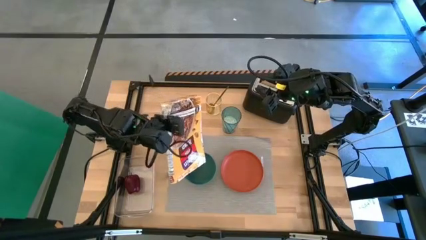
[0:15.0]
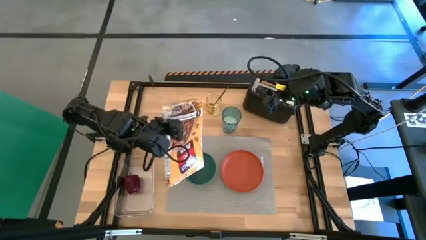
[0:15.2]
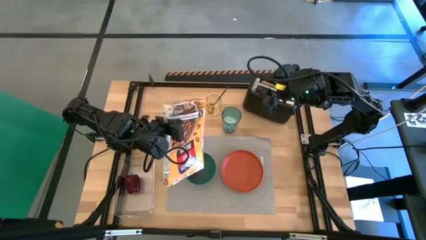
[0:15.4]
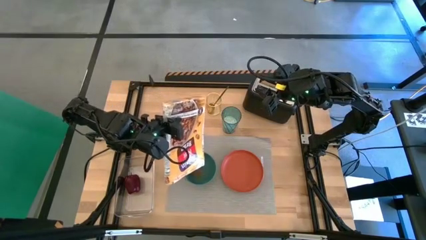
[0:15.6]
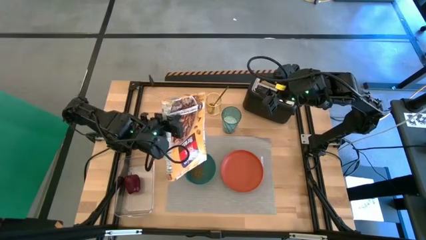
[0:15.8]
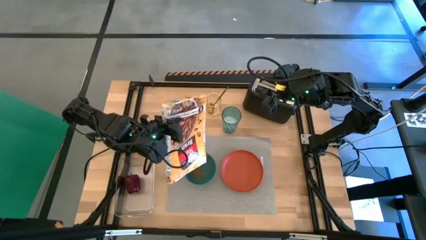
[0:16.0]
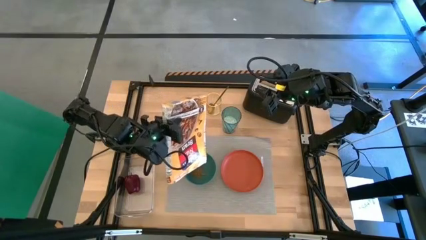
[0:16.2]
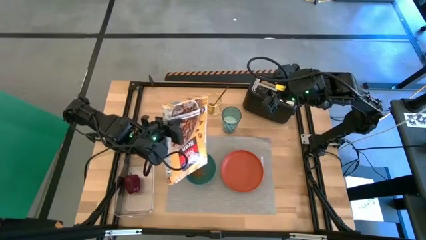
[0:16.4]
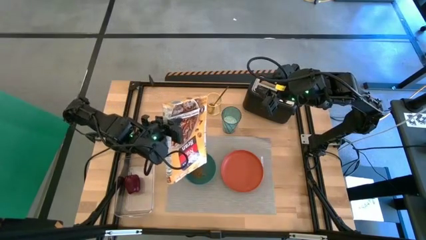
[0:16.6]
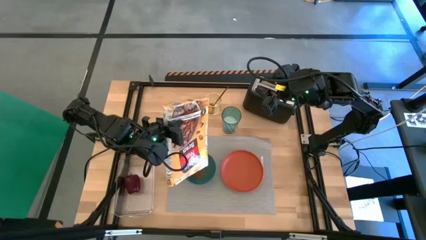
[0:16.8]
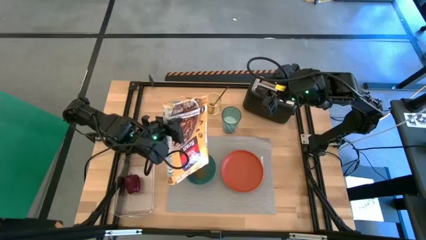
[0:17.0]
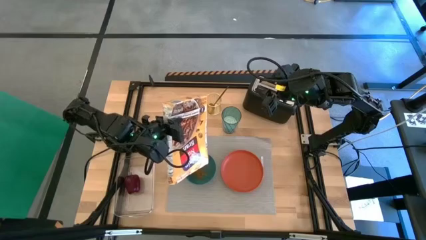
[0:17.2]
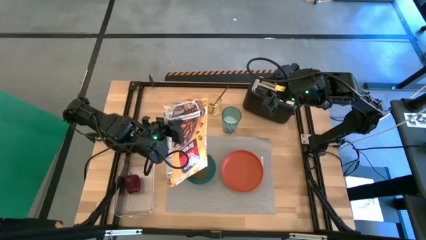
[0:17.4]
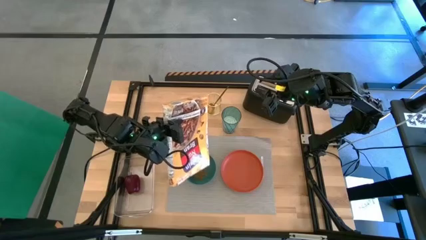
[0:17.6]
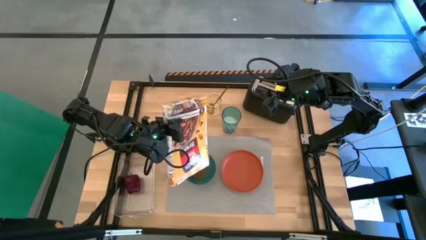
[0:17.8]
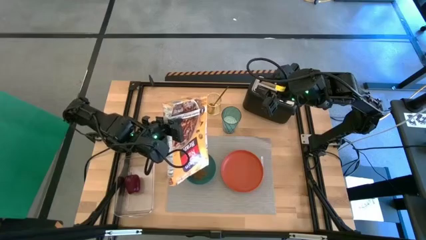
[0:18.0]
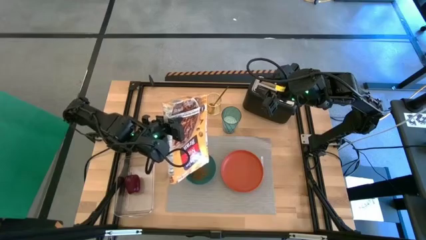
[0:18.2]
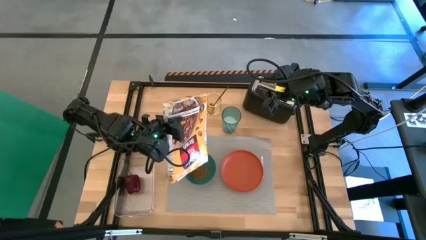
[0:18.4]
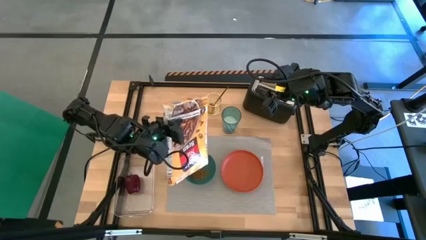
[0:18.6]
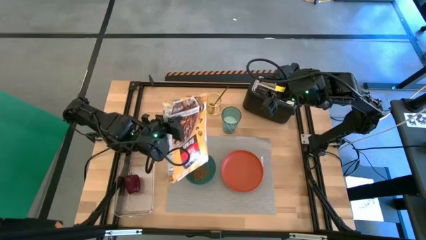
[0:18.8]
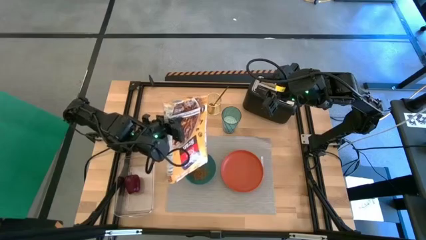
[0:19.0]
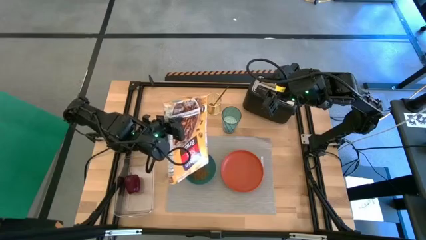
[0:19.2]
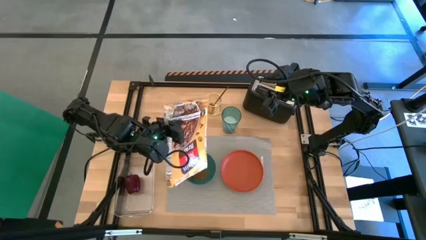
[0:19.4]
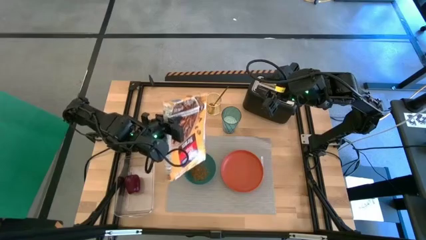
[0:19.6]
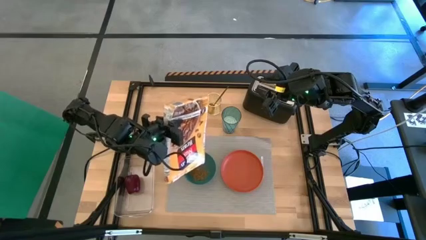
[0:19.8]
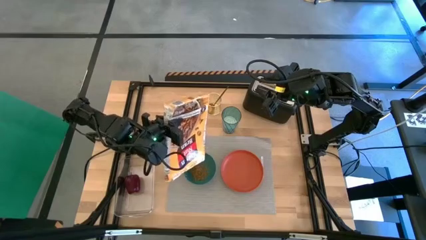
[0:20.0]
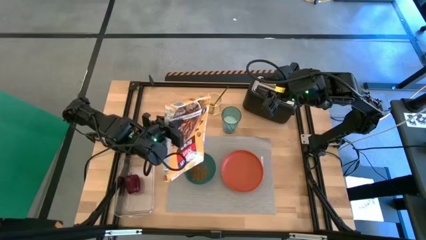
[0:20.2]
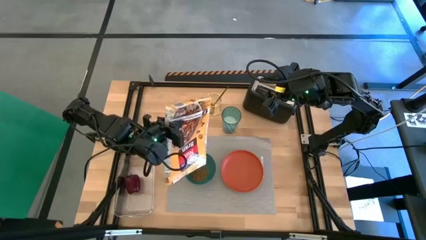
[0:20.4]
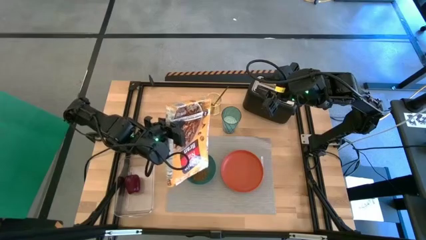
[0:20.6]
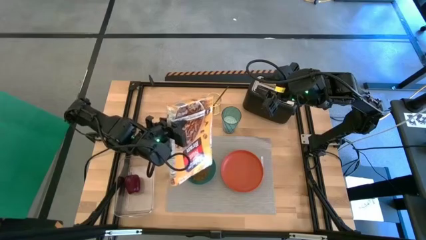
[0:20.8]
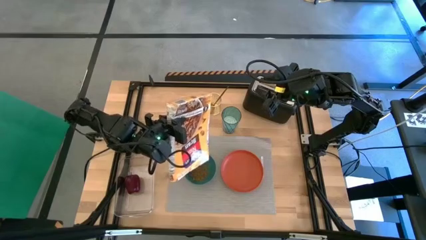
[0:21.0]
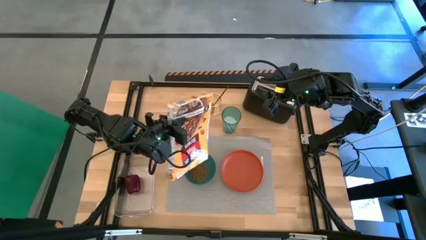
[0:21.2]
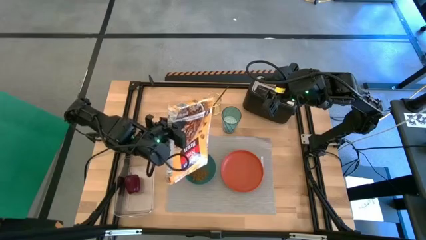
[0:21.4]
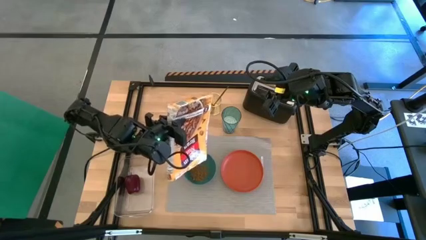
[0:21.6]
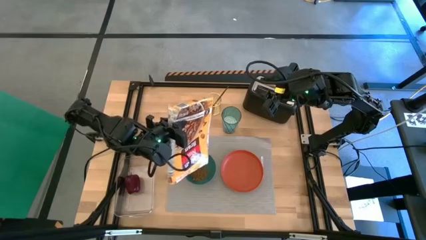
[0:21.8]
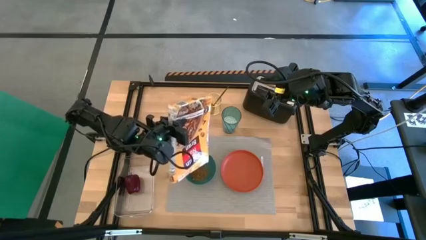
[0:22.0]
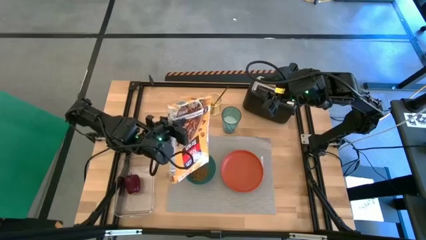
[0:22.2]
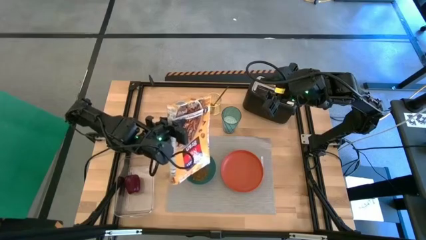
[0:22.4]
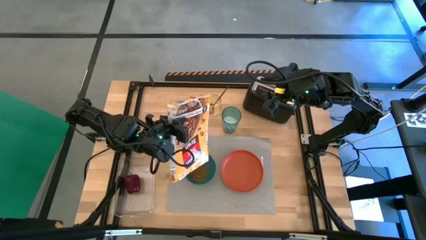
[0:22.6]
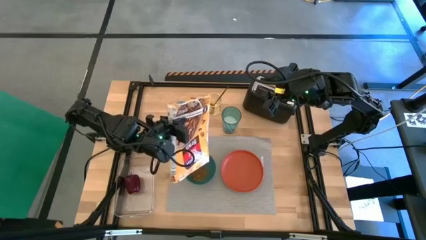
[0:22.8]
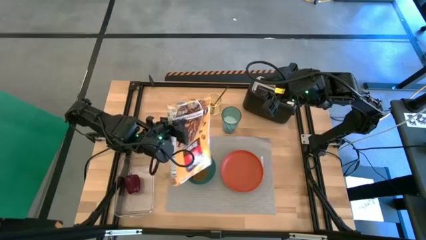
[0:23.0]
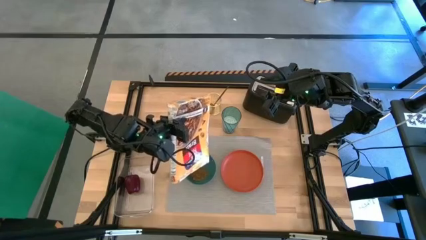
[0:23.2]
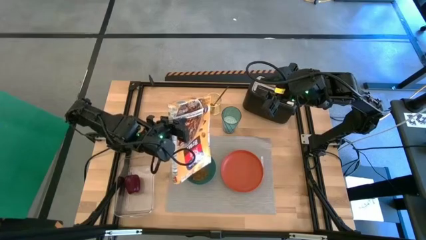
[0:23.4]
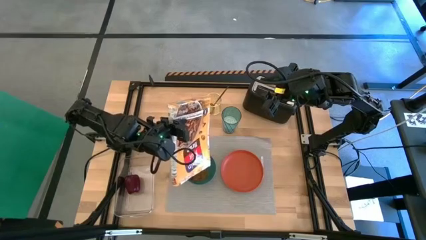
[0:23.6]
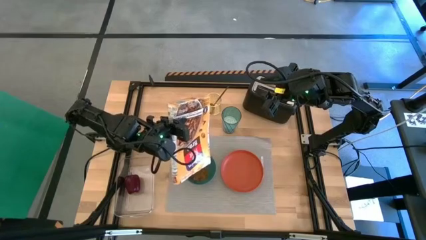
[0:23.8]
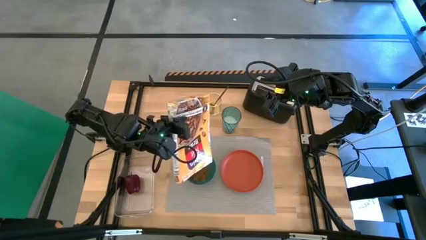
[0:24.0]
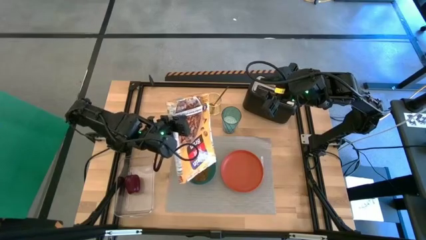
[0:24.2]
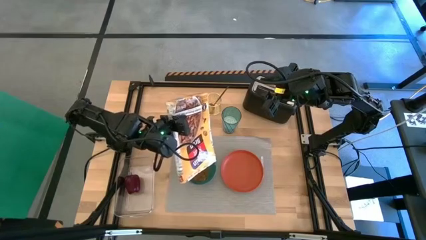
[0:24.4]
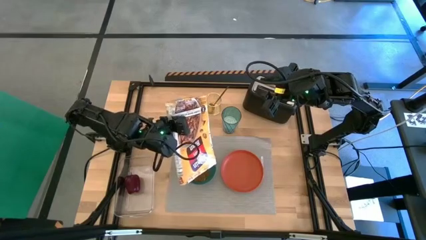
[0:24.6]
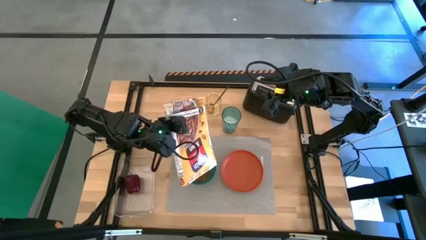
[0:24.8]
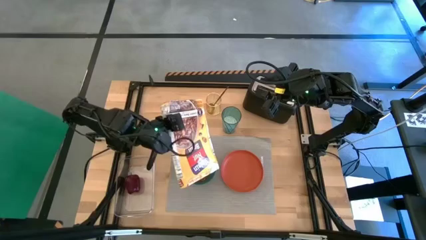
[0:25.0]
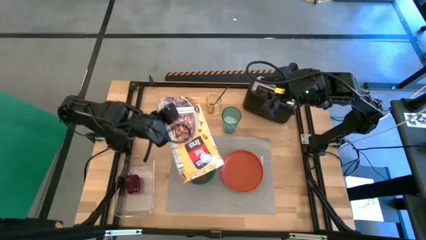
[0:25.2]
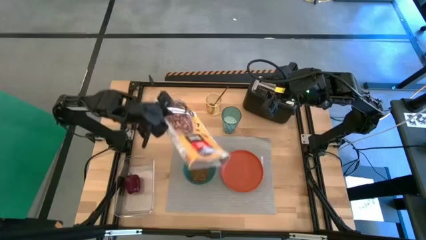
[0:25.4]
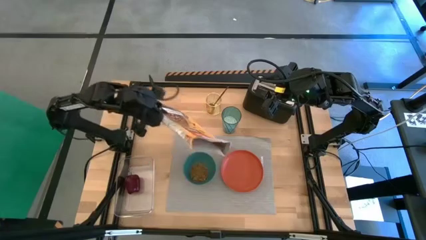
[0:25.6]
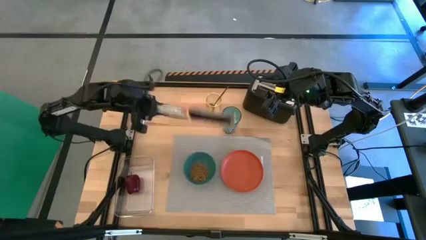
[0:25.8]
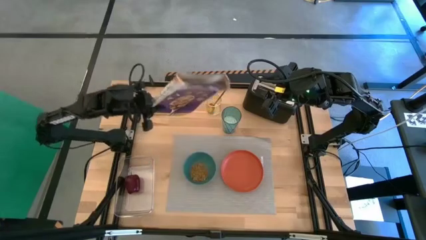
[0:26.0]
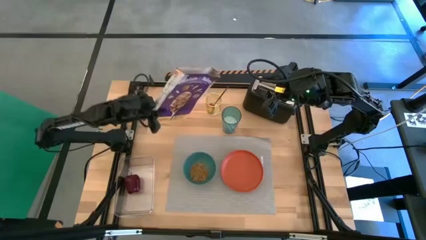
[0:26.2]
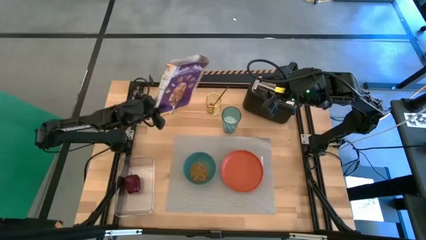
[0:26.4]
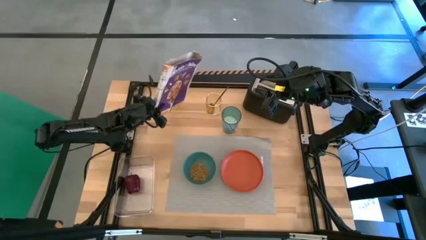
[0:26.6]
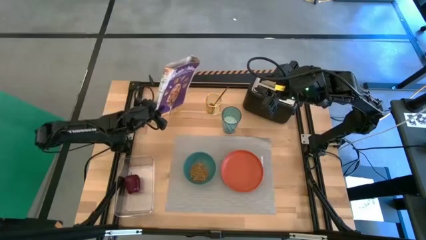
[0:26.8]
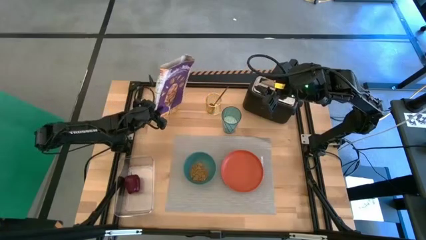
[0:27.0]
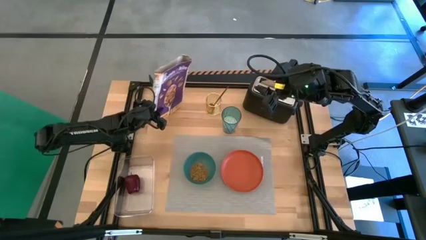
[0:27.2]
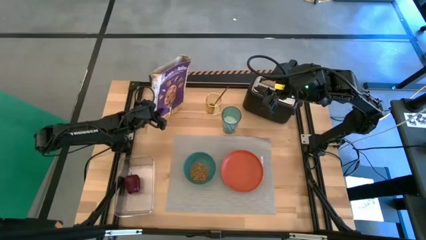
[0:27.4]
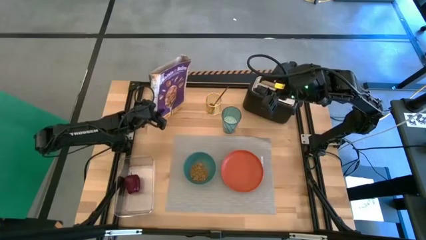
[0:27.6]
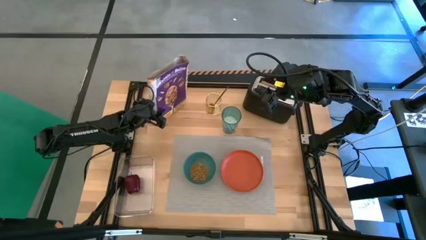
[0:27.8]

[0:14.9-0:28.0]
Task: Arrange a breakfast setting
Pour the cereals from the cereal box into the green bowl
